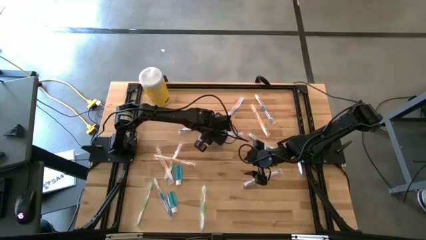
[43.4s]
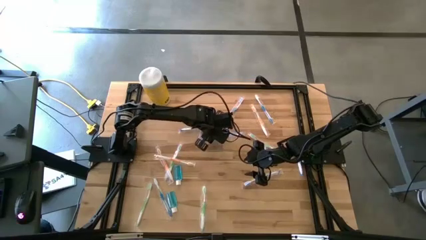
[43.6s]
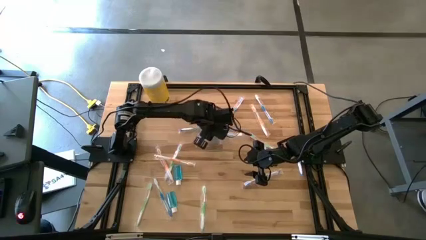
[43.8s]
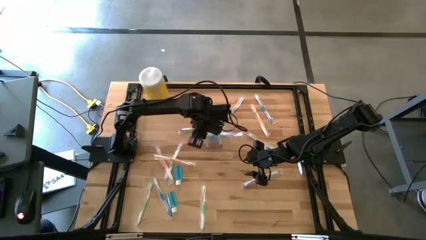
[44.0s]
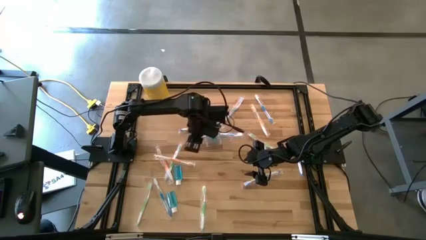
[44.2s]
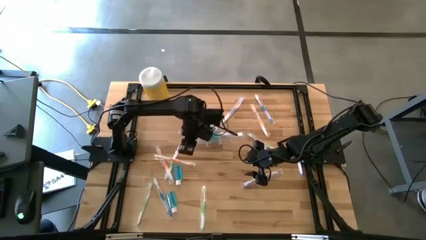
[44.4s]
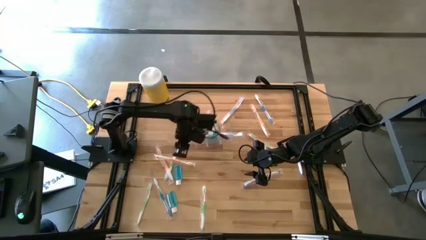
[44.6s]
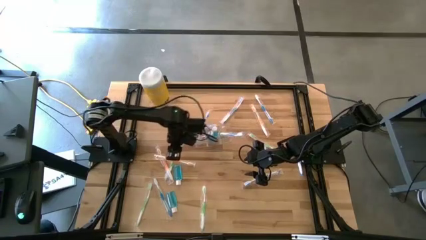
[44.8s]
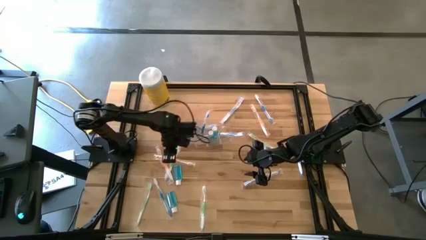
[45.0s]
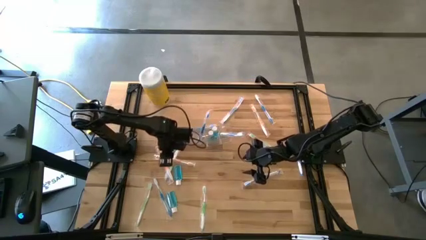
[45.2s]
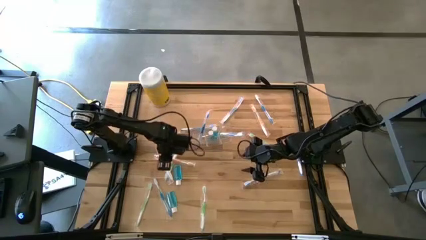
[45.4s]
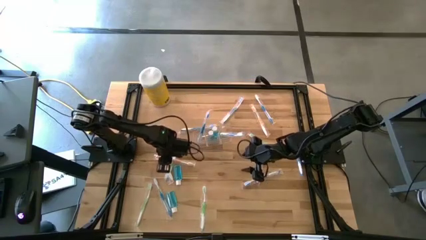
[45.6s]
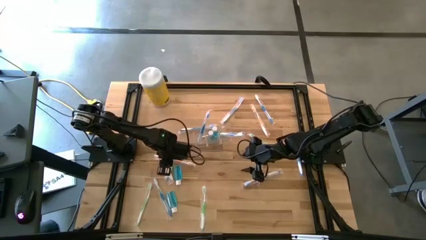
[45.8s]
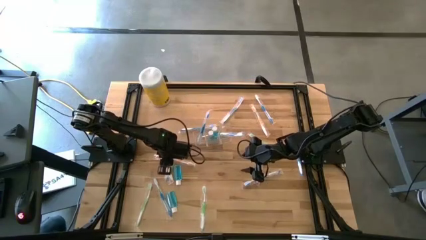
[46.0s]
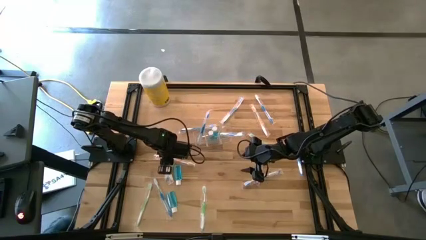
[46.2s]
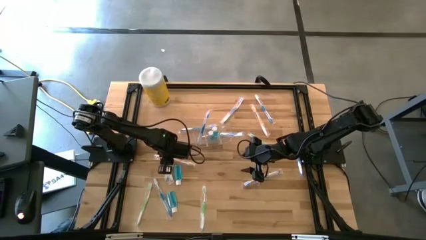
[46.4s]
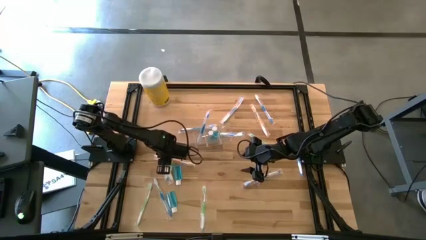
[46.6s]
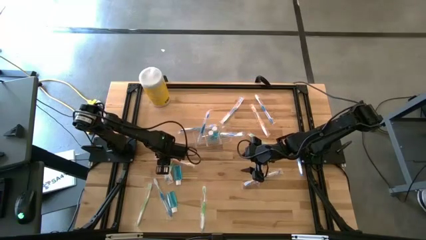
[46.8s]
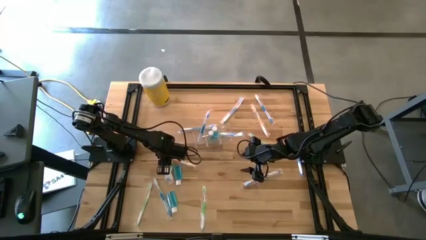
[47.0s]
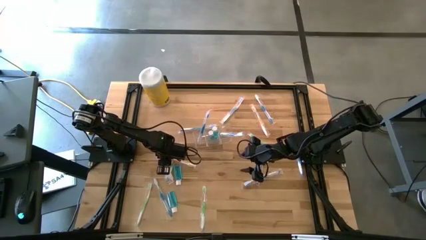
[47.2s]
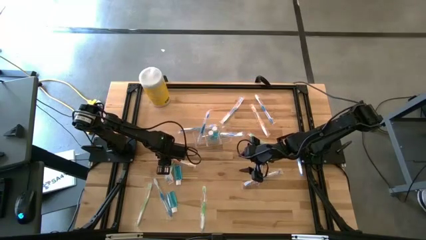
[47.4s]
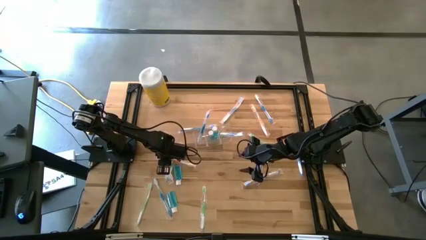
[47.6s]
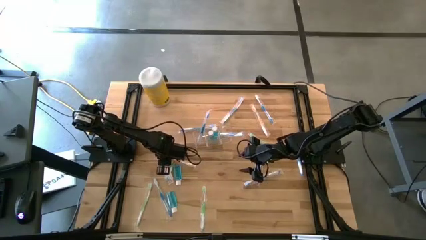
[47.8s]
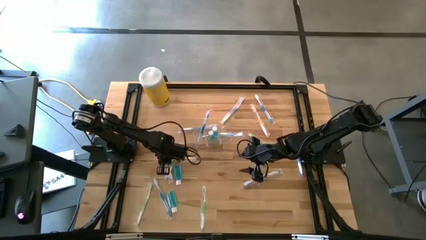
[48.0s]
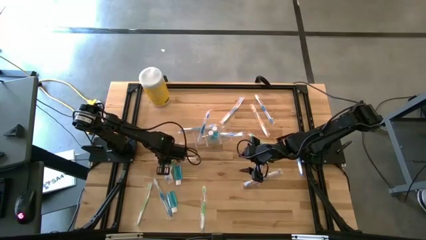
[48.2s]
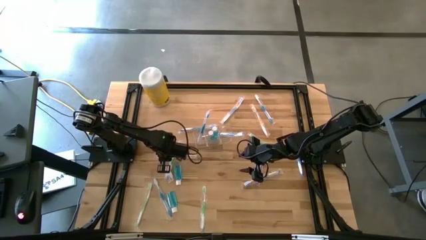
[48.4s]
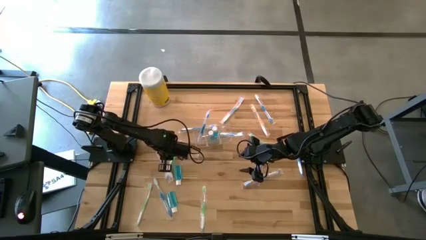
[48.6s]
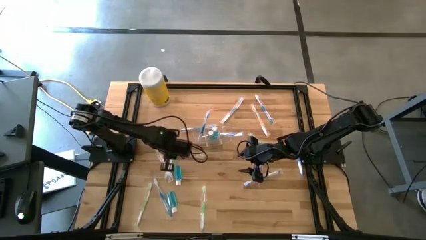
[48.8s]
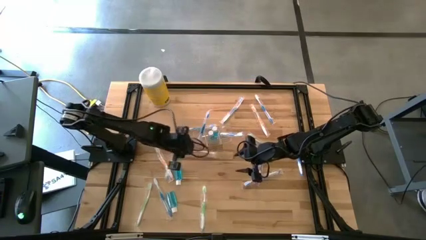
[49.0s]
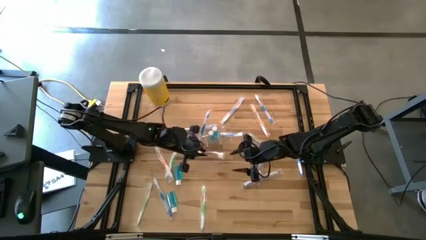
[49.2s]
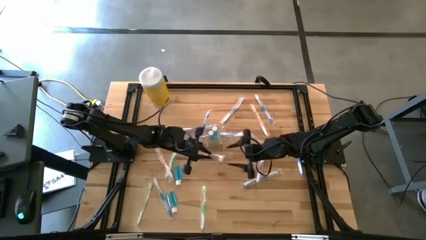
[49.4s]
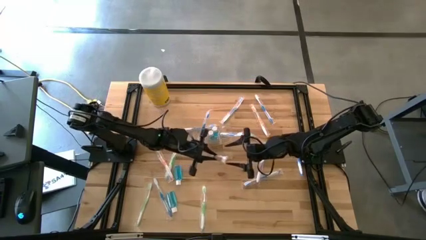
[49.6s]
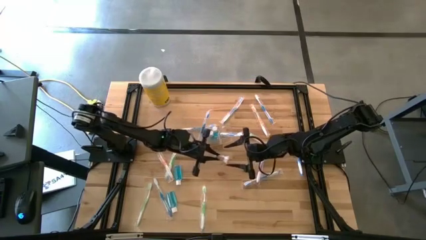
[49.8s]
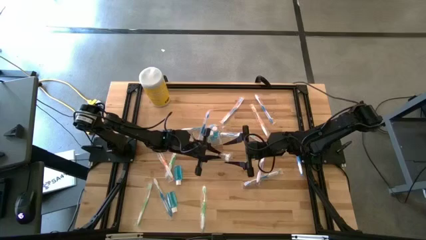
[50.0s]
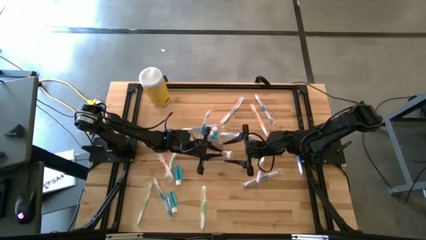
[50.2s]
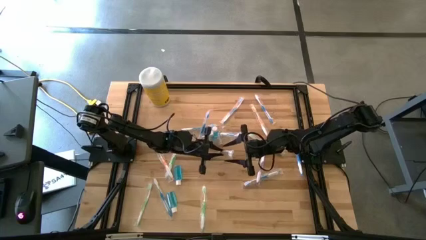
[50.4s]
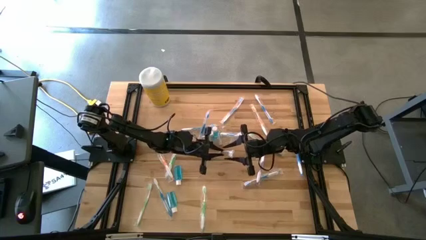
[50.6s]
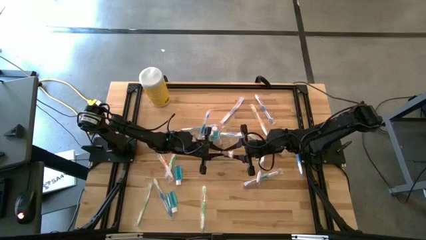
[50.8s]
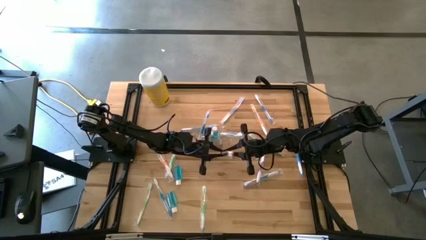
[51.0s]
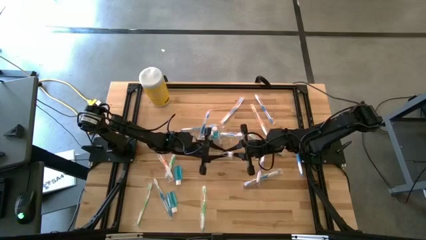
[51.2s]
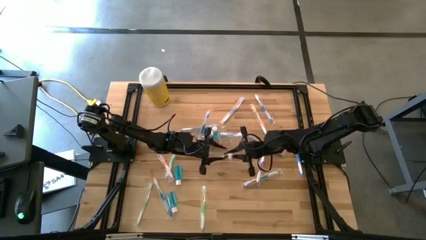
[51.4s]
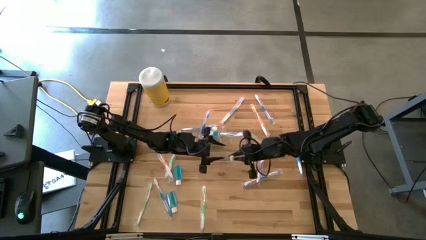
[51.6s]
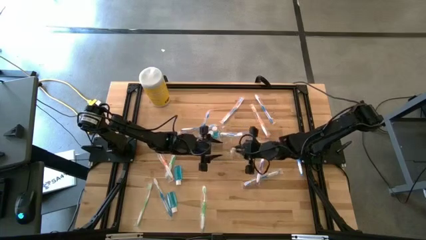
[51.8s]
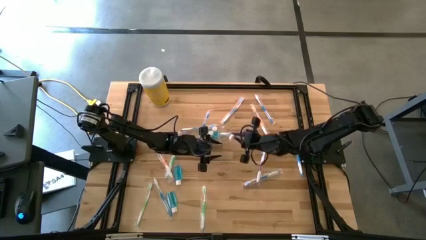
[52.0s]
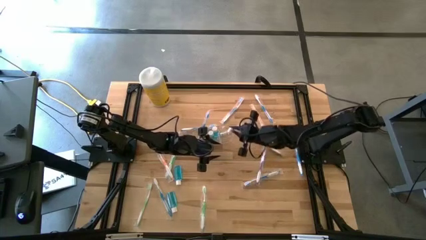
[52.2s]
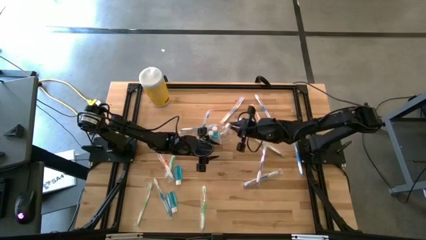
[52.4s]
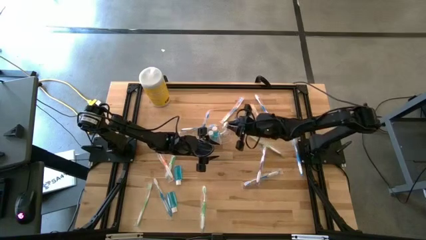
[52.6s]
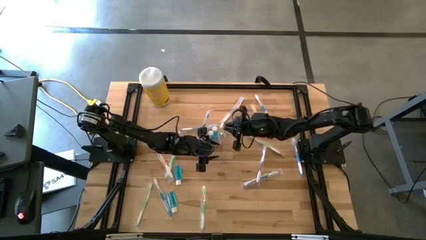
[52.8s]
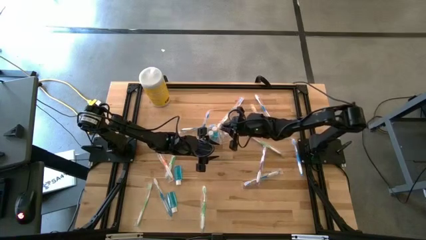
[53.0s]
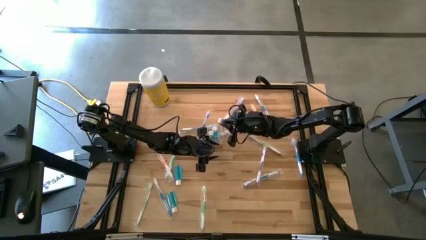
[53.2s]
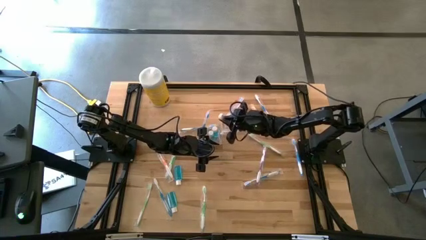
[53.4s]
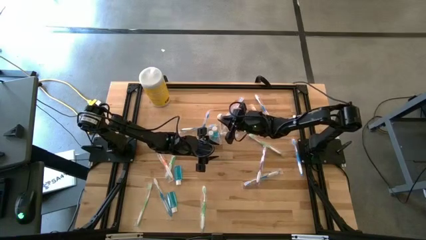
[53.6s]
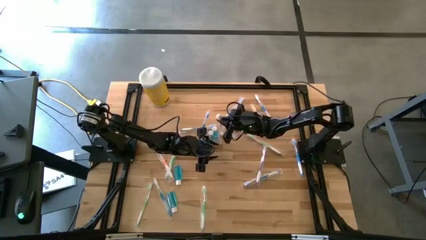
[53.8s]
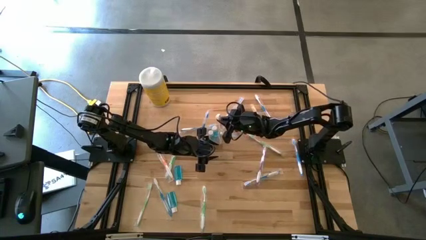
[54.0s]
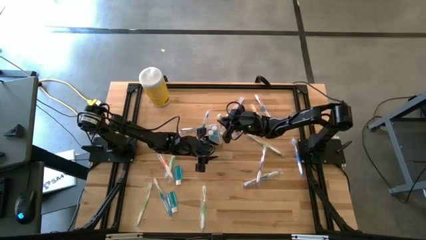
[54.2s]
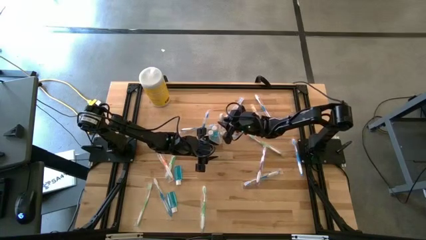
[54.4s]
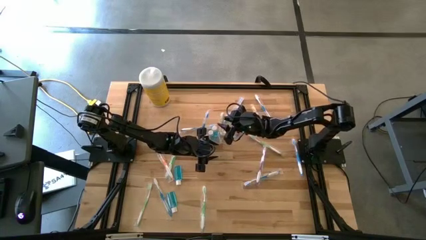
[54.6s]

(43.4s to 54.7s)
Task: Pick & Place toothbrushing station
Put the bottom right orange toothbrush into the transparent organizer

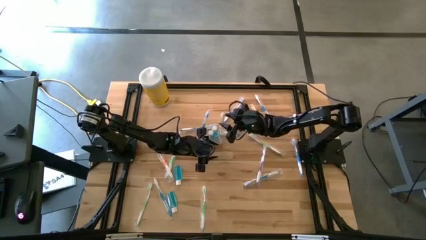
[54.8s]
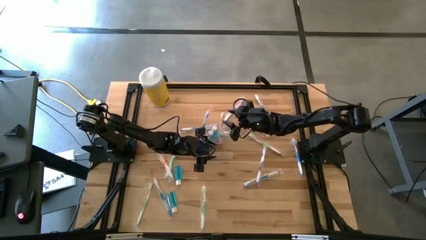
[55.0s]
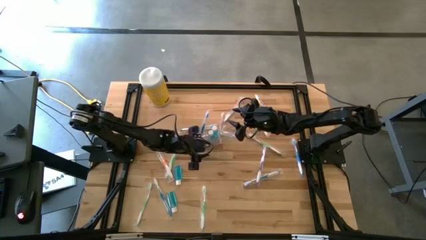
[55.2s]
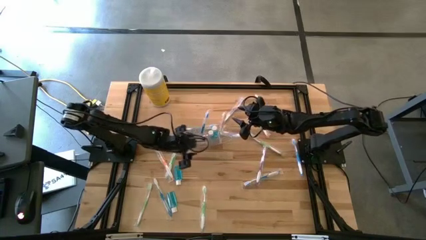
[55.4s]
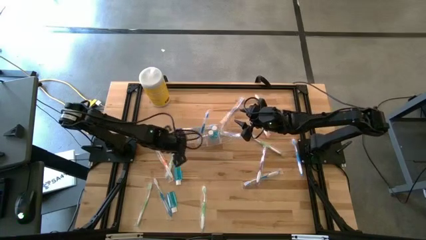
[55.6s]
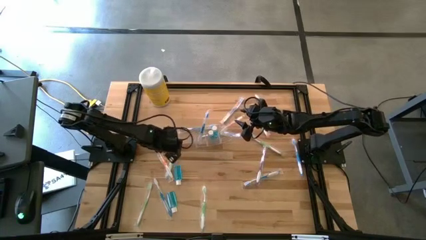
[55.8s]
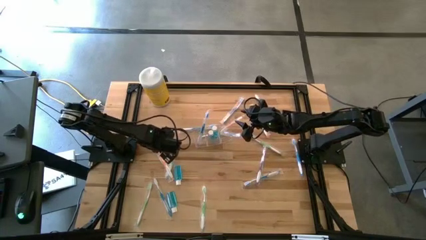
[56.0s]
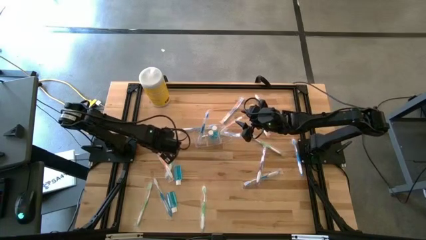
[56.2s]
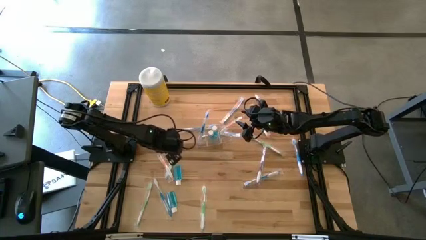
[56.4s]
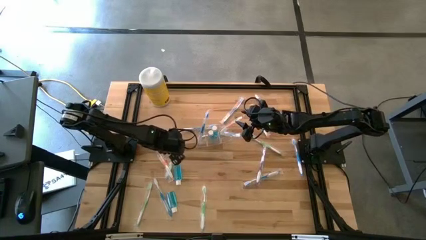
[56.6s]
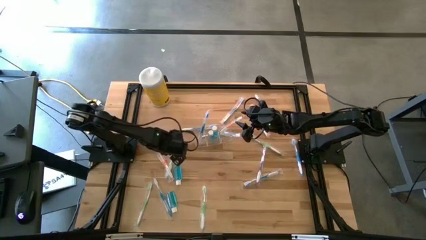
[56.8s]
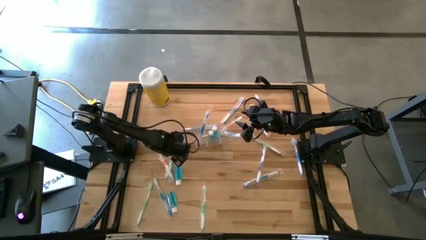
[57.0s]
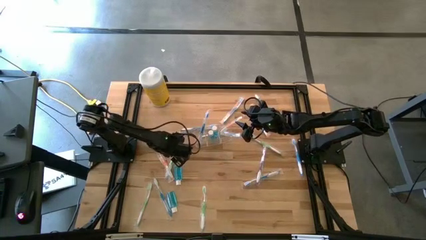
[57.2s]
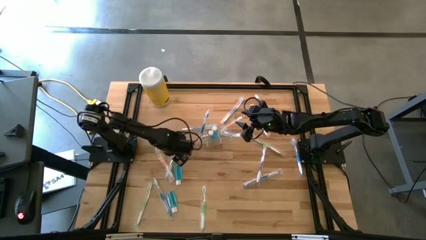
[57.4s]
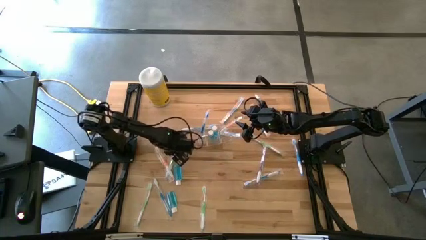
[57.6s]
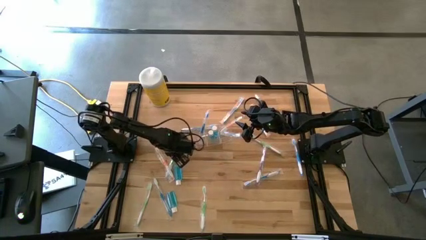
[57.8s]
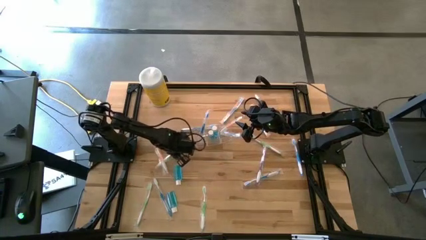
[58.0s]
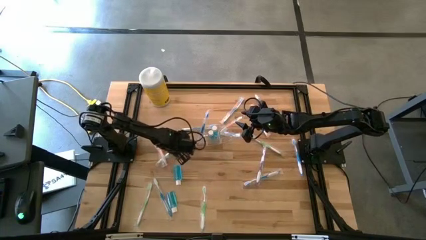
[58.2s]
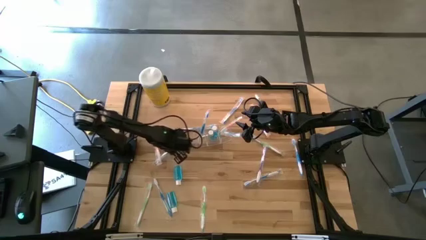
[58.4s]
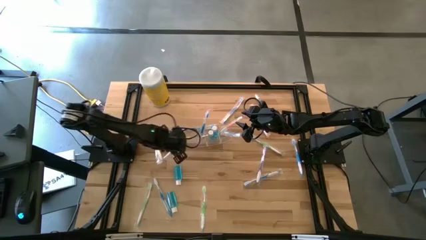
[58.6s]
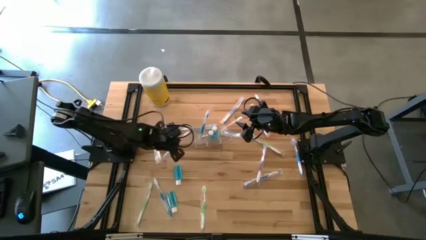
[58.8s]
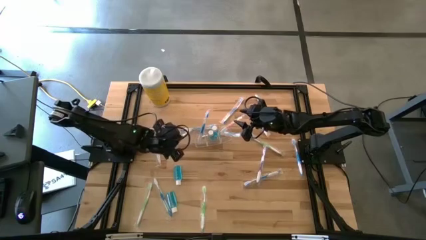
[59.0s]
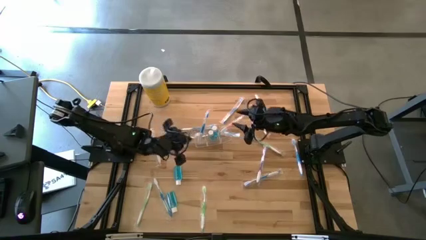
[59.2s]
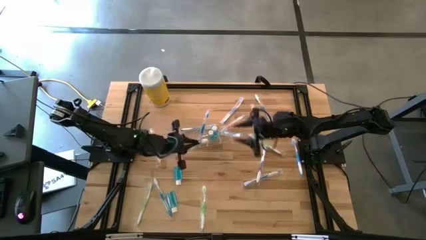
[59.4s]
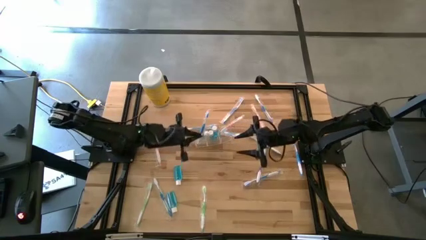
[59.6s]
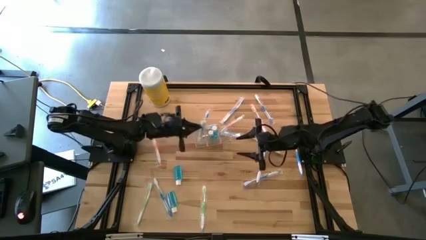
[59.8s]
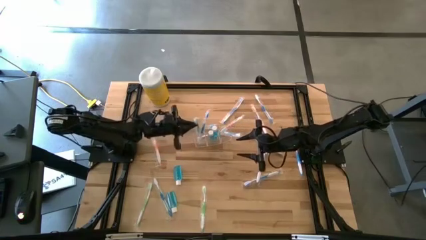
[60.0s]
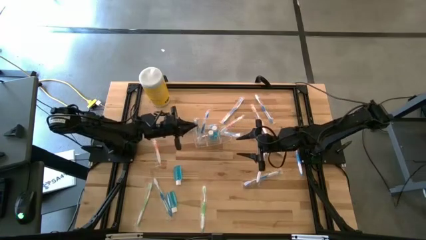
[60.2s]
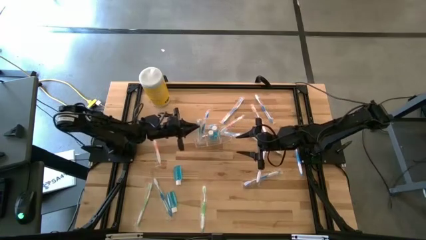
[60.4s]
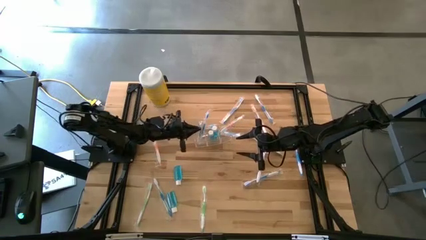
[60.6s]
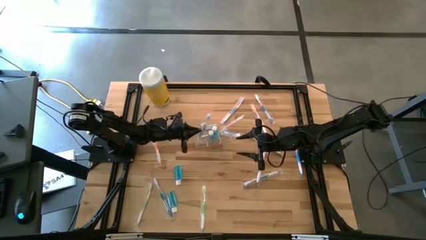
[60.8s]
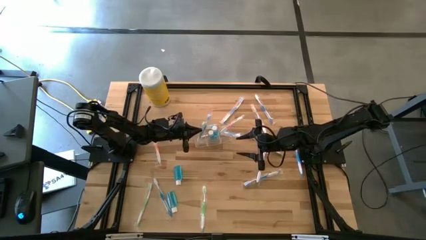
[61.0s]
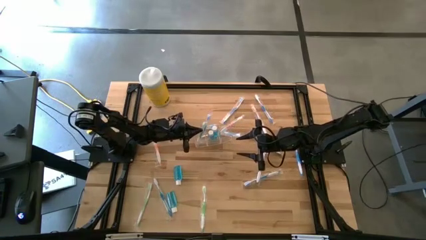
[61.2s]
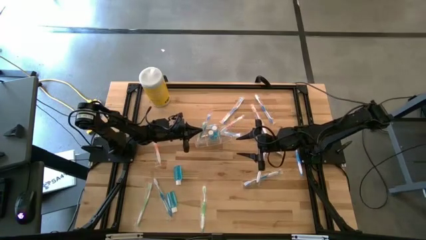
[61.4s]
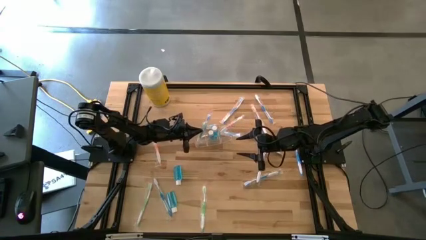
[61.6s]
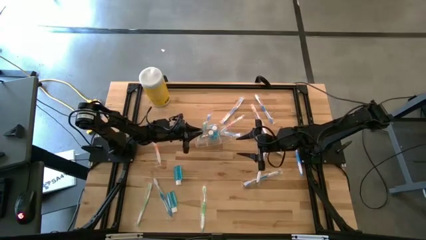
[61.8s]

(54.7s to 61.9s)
Put the green toothbrush into the transparent organizer
